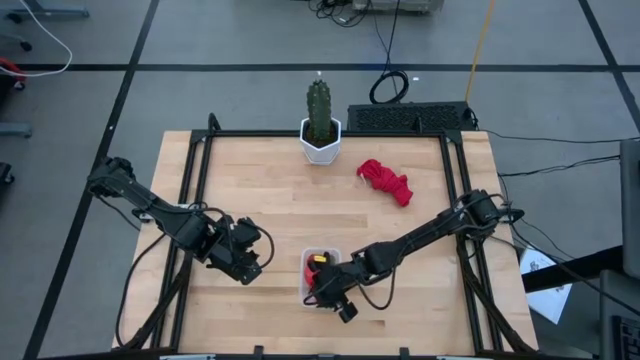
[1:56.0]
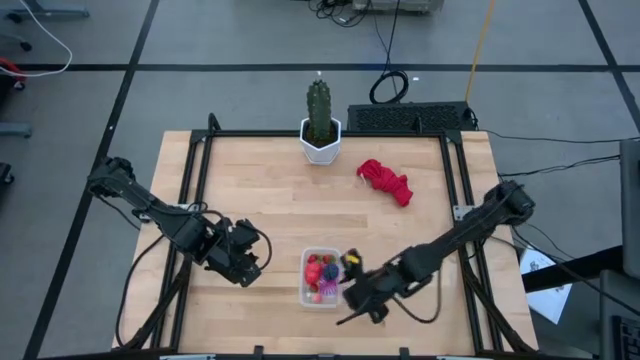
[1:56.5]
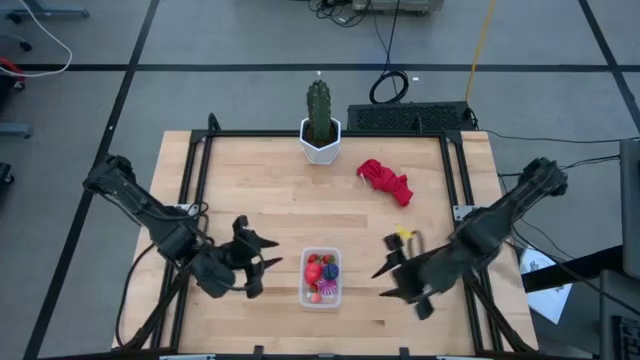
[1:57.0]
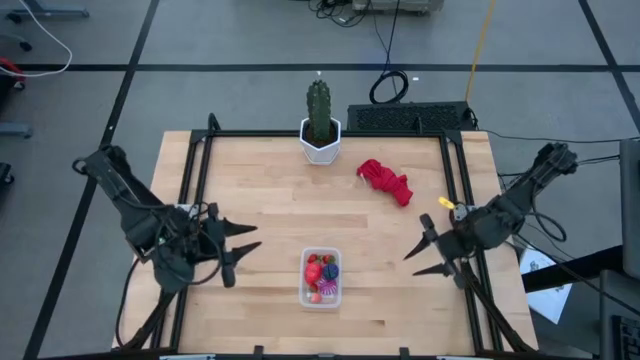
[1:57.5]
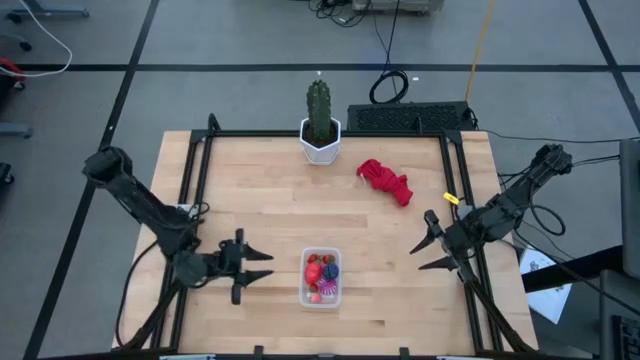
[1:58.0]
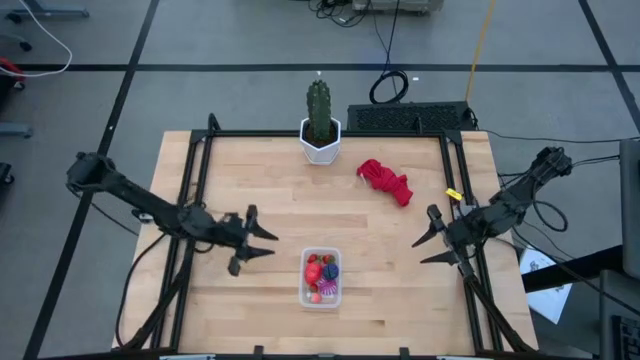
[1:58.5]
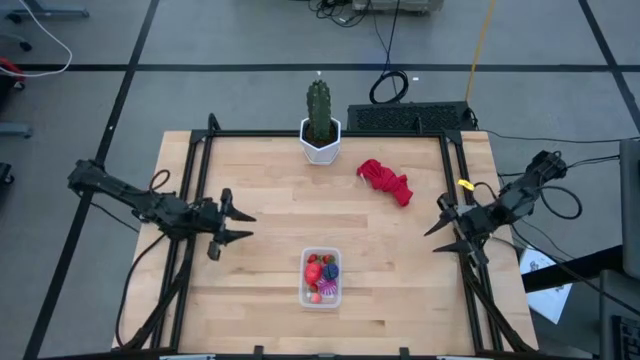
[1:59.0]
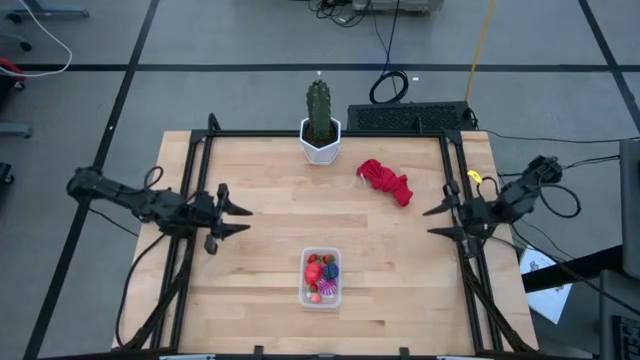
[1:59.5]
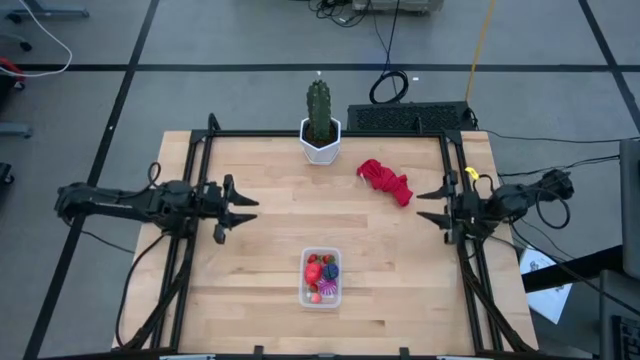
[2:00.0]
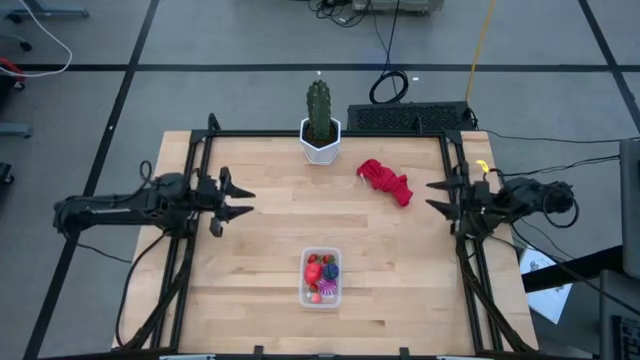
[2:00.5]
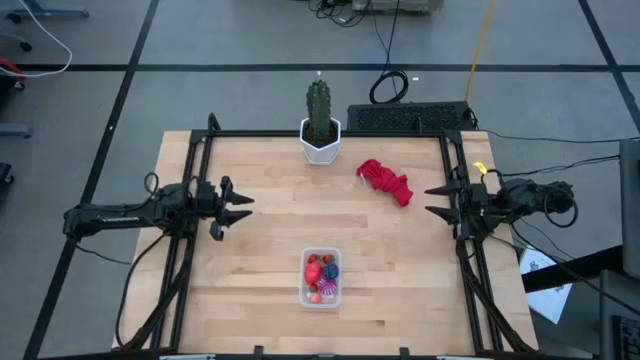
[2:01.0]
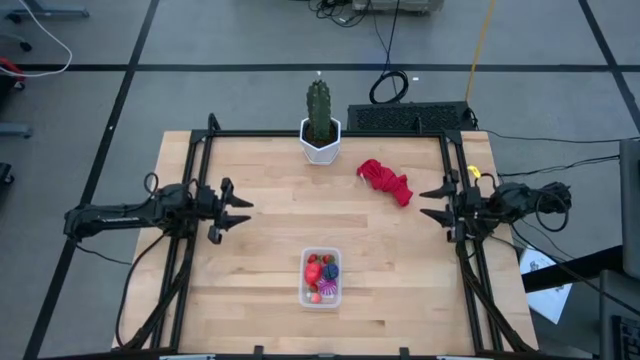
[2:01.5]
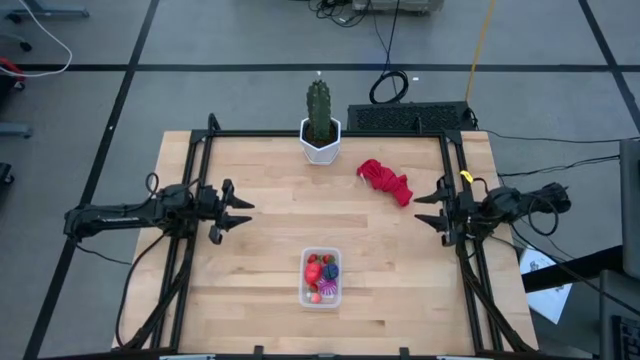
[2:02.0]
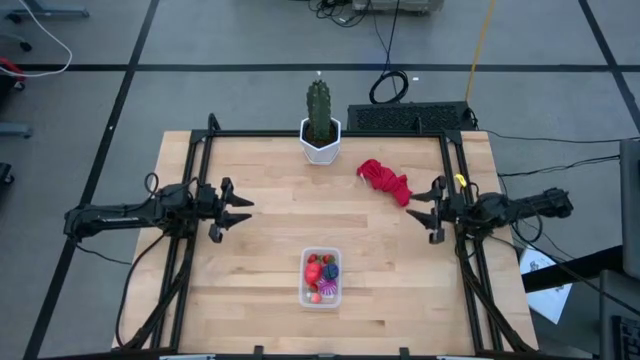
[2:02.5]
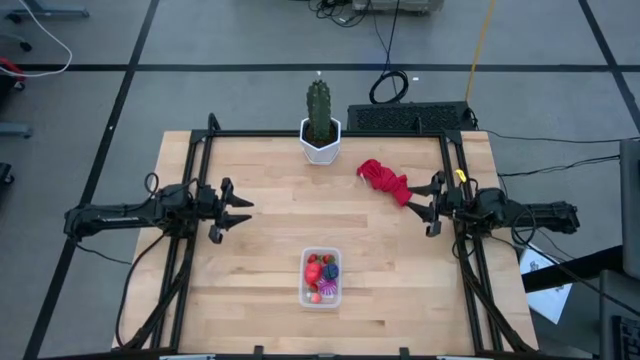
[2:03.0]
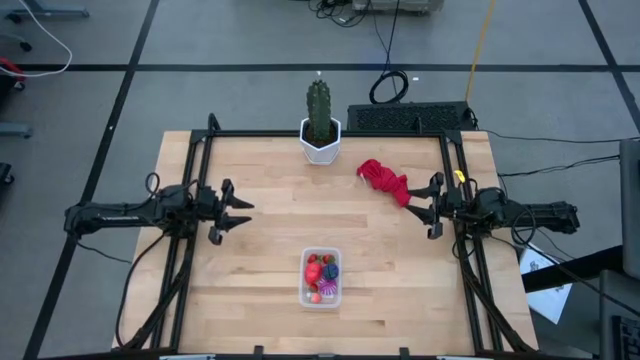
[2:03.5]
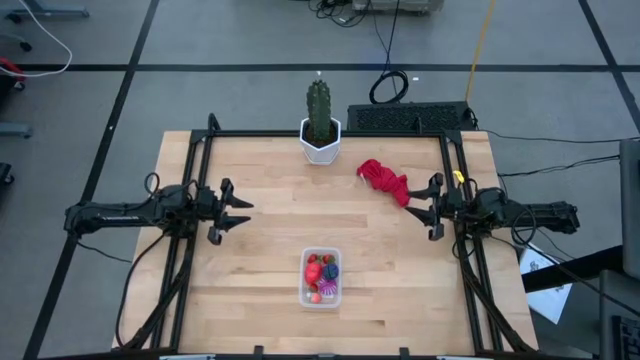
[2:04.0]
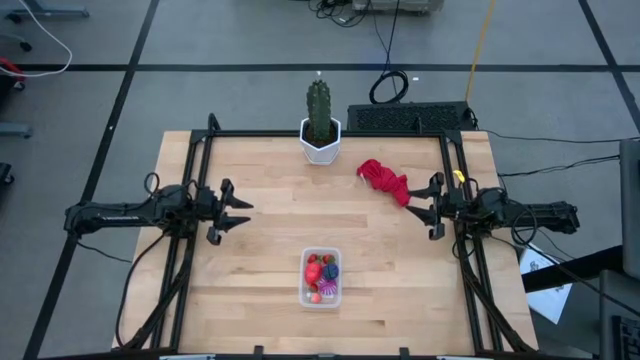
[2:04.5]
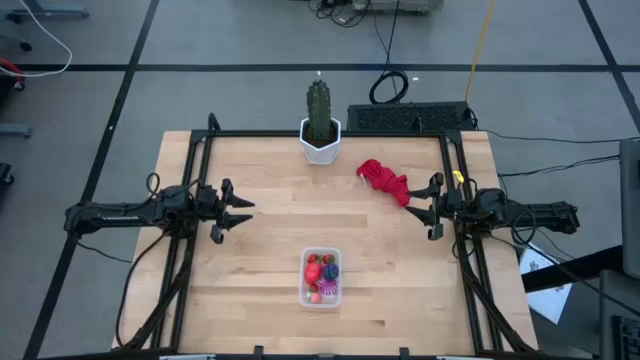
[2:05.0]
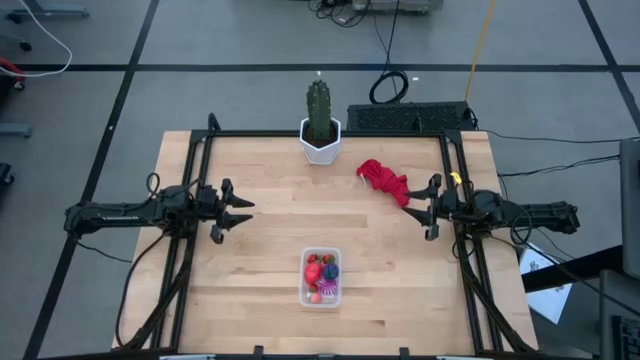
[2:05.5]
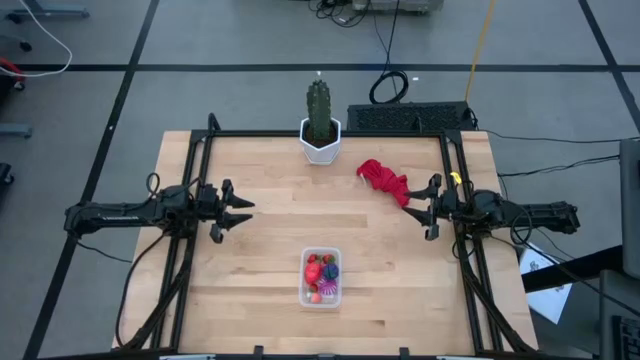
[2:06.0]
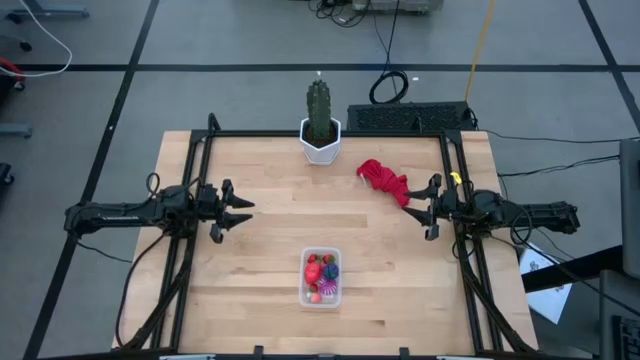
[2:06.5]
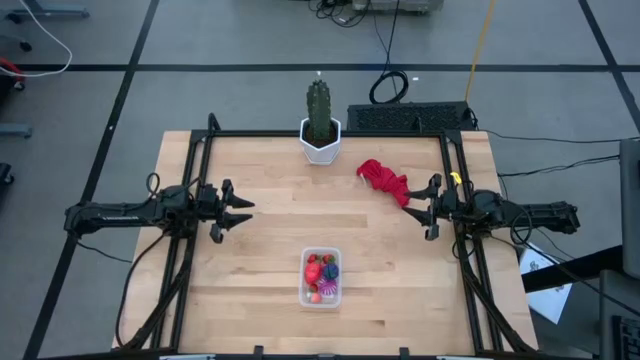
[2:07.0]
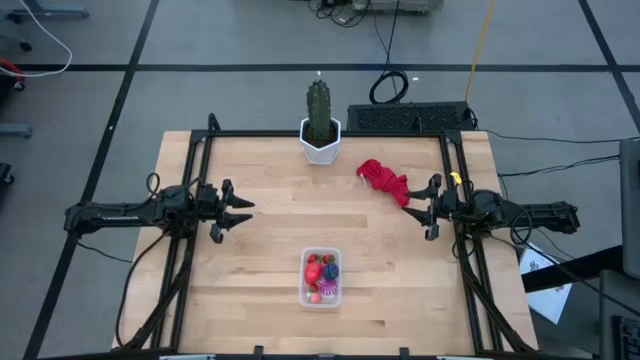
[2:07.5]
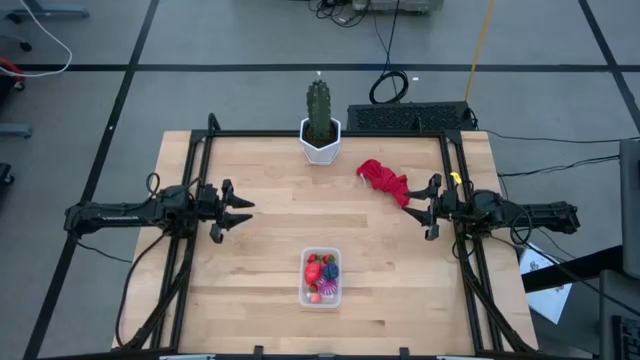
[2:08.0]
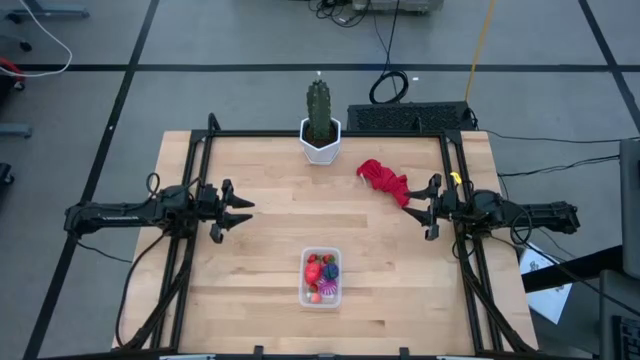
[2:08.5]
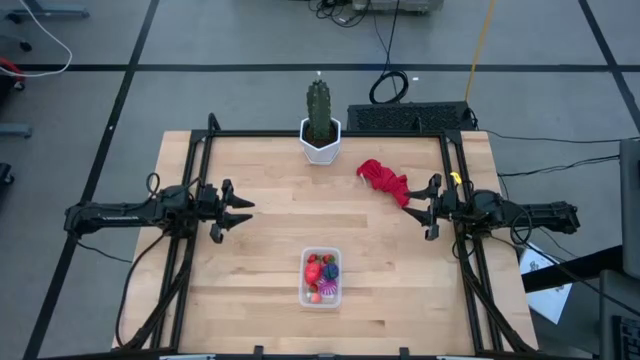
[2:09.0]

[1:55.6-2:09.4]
Task: Pick and placing Produce into tupperware
Return to Home Position

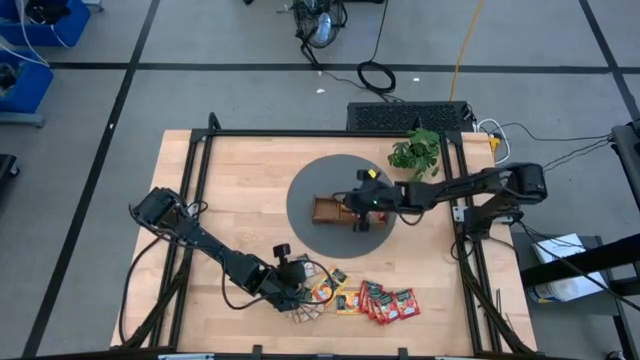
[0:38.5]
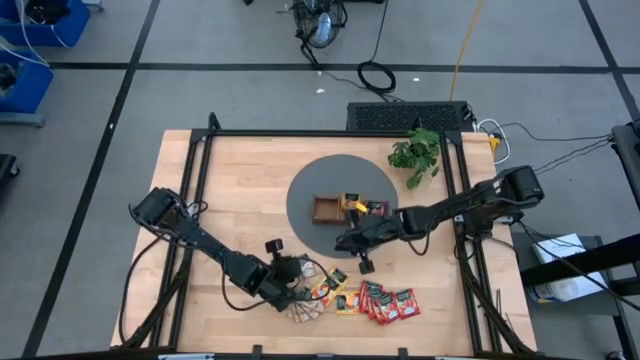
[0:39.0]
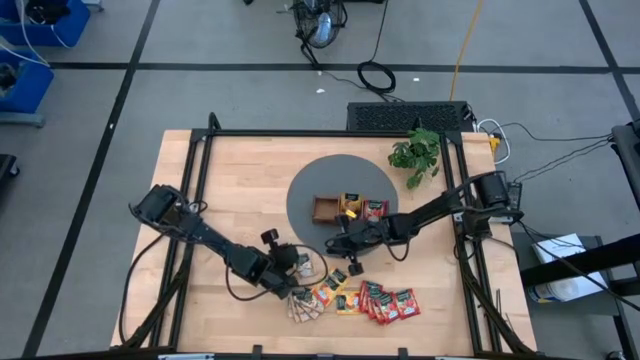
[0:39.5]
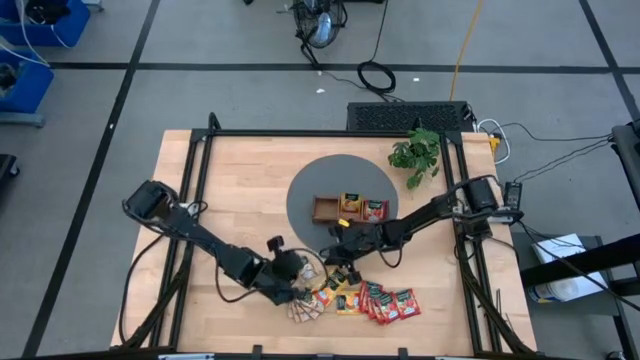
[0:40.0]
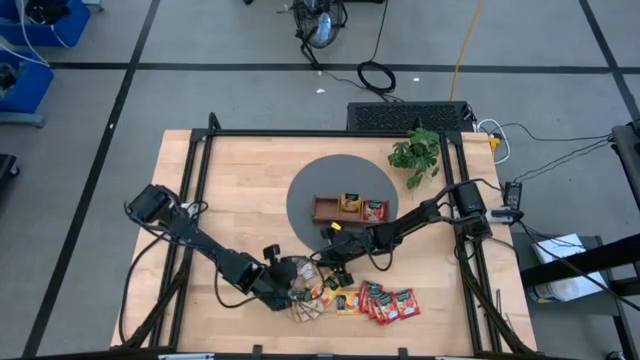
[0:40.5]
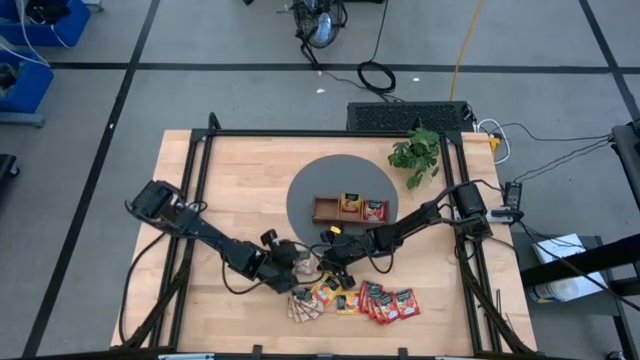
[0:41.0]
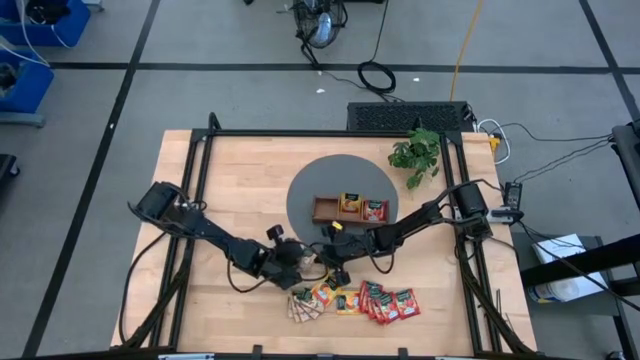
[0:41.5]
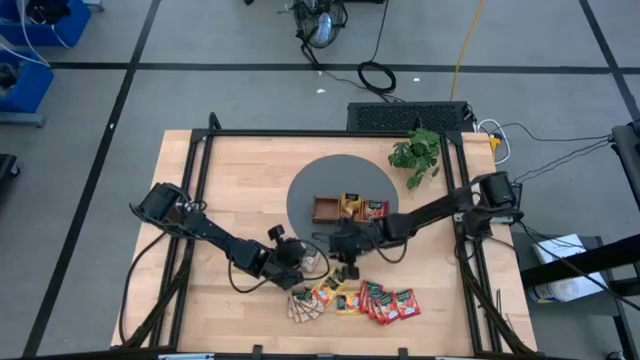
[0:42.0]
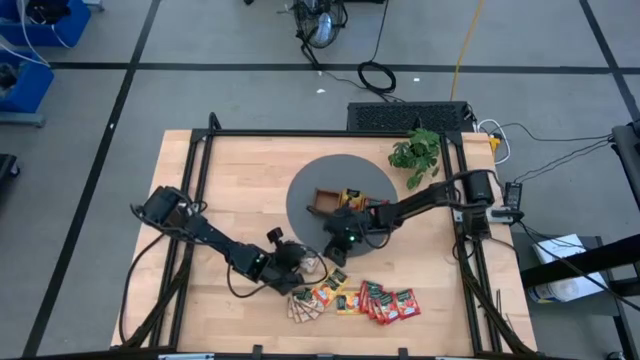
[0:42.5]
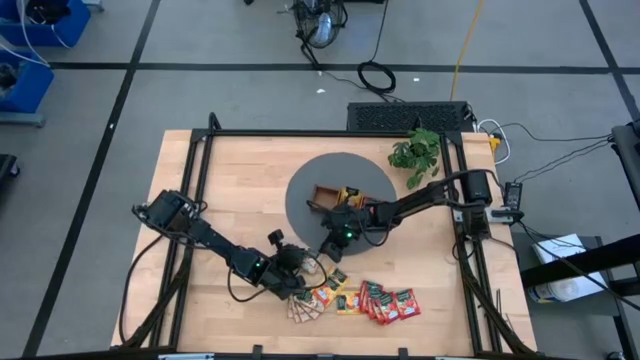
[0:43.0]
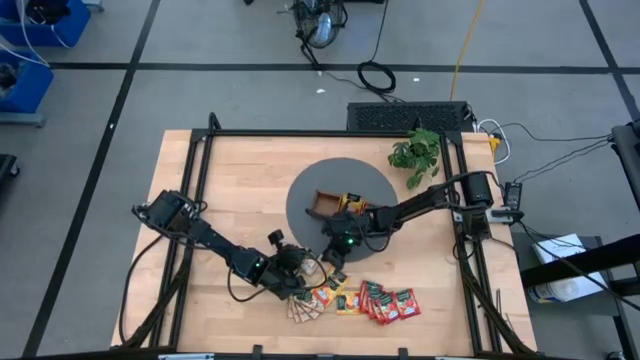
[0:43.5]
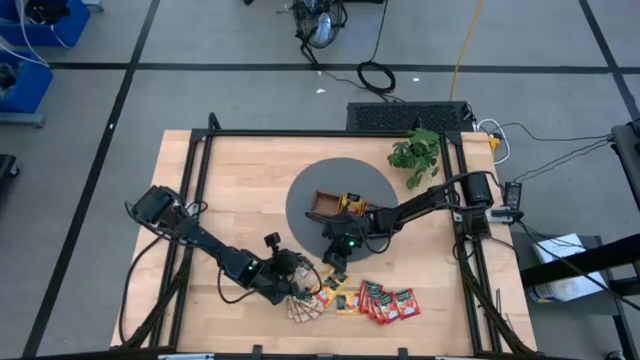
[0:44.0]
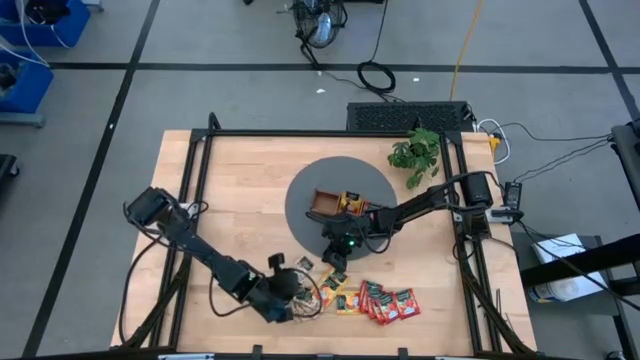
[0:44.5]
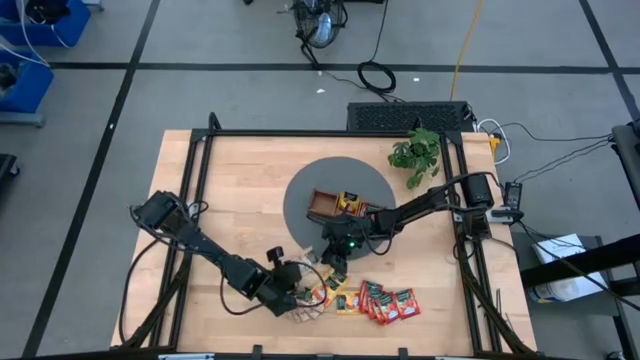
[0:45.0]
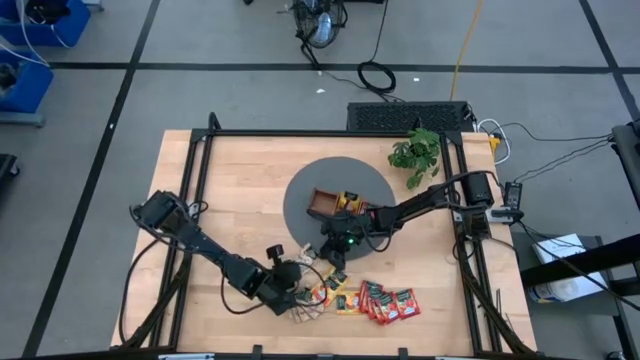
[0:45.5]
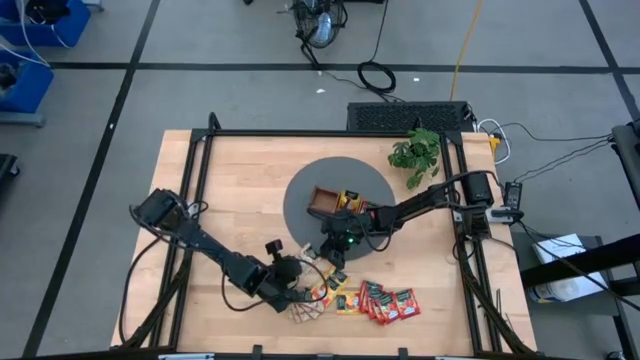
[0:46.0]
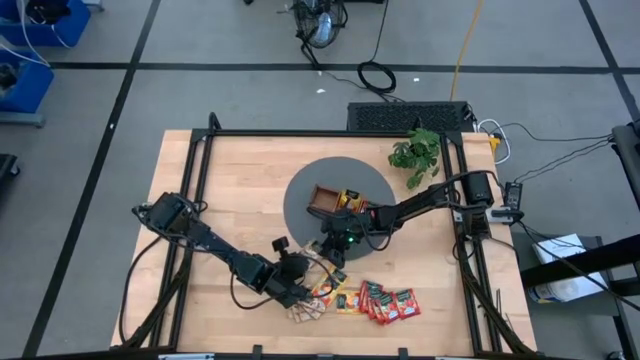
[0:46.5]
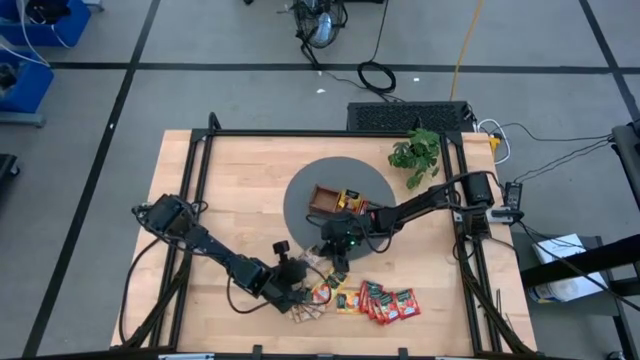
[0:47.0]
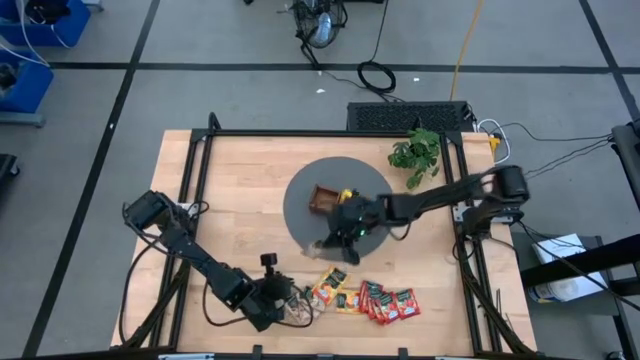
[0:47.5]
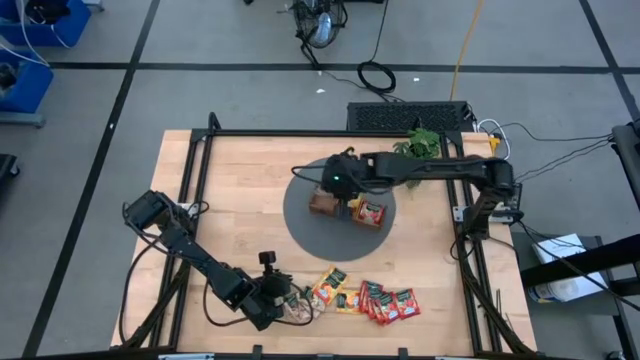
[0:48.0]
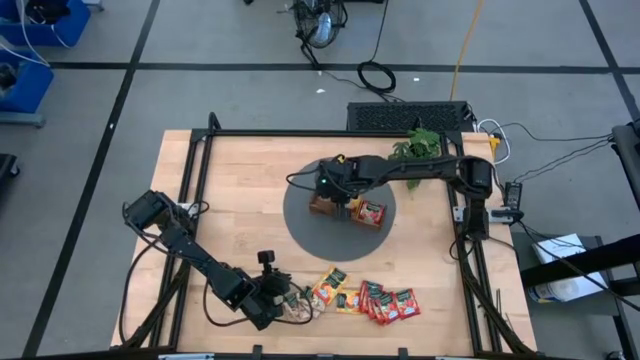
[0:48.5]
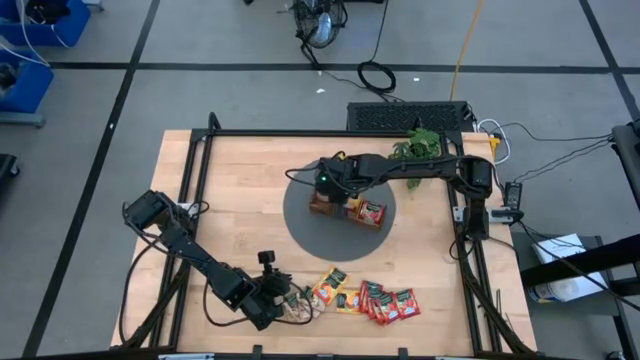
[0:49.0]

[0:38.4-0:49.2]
Task: Pick & Place Tea
Put the brown tea bag to the left section into the wooden organizer
